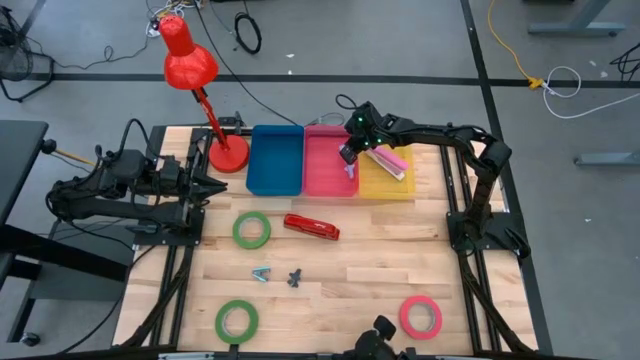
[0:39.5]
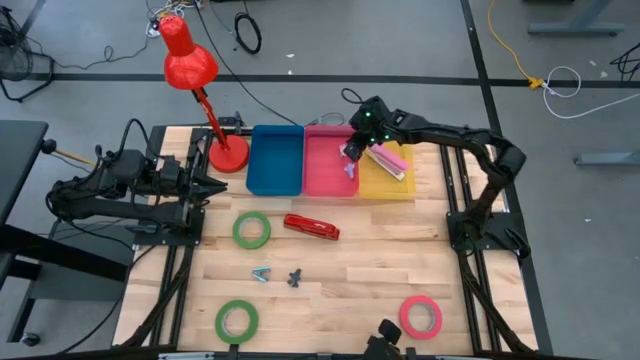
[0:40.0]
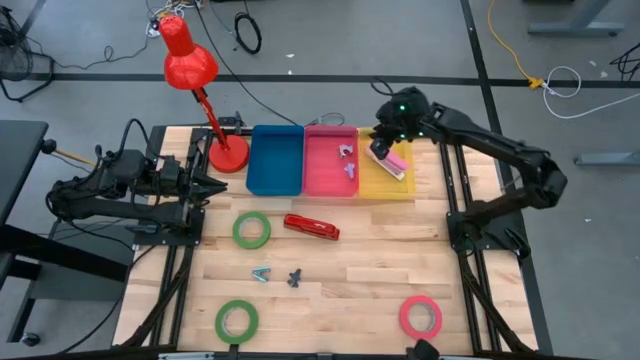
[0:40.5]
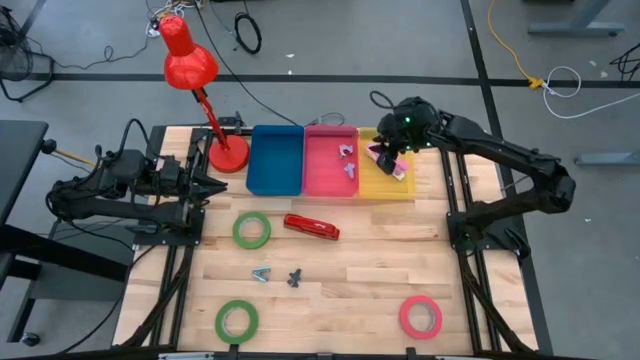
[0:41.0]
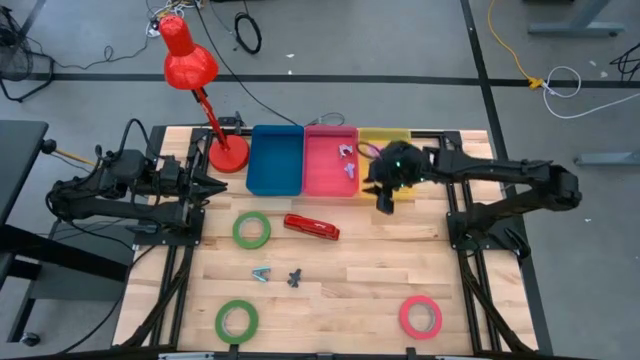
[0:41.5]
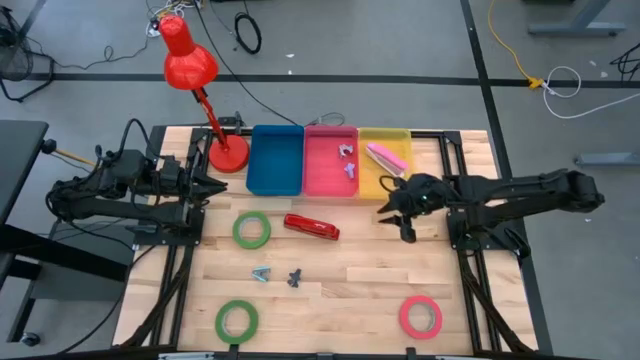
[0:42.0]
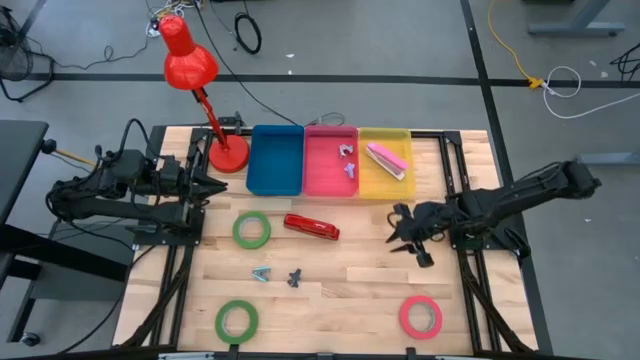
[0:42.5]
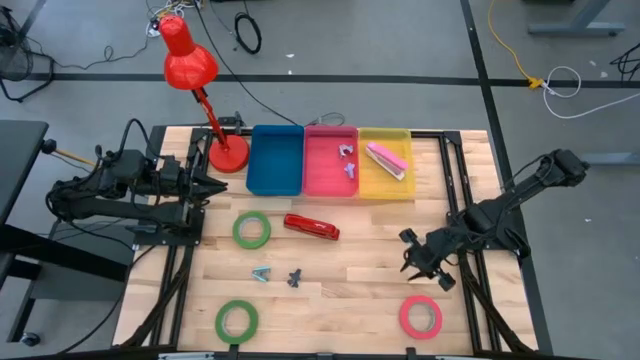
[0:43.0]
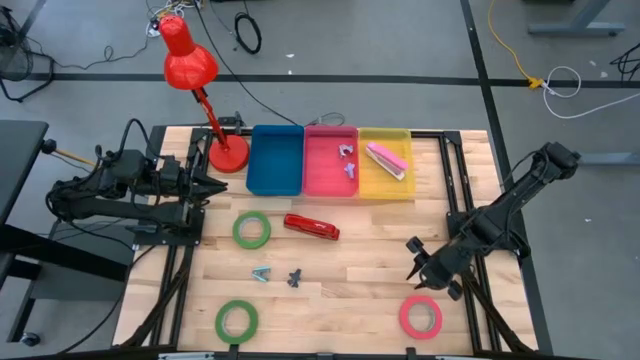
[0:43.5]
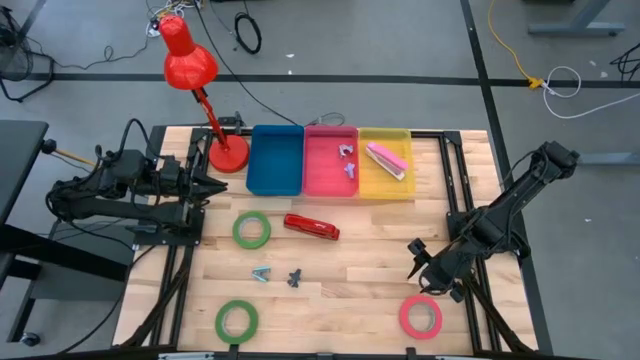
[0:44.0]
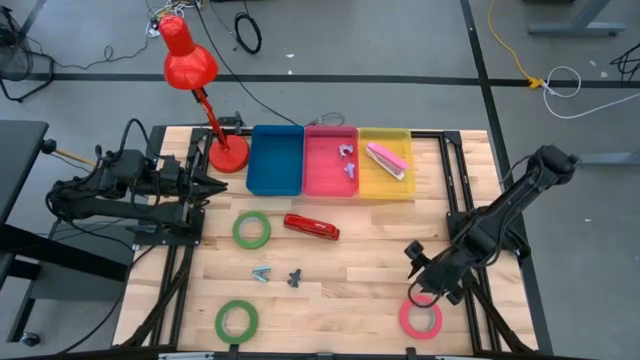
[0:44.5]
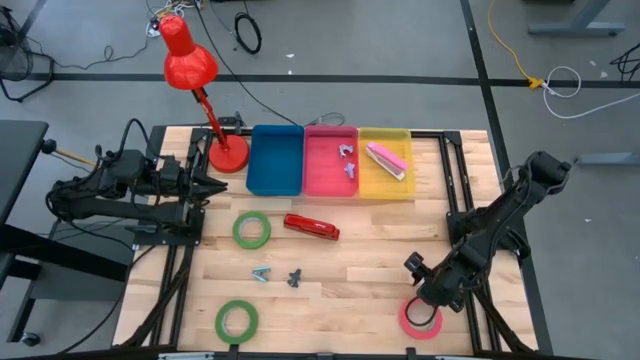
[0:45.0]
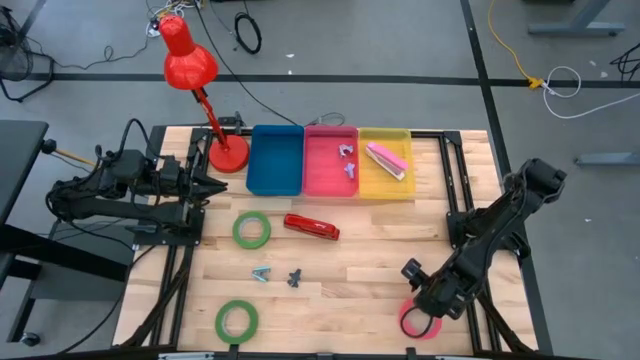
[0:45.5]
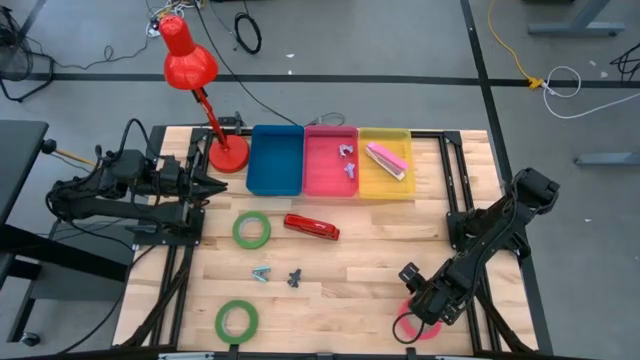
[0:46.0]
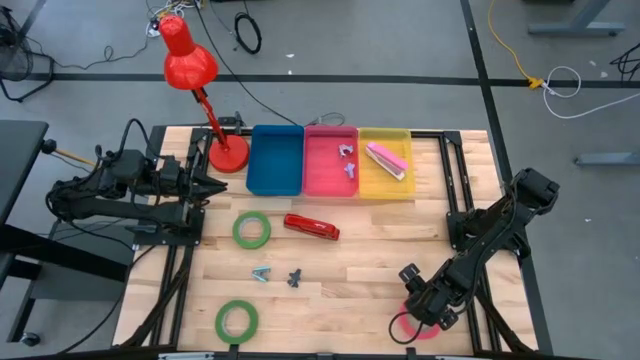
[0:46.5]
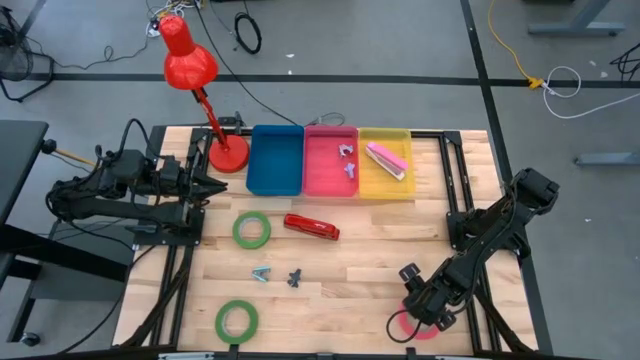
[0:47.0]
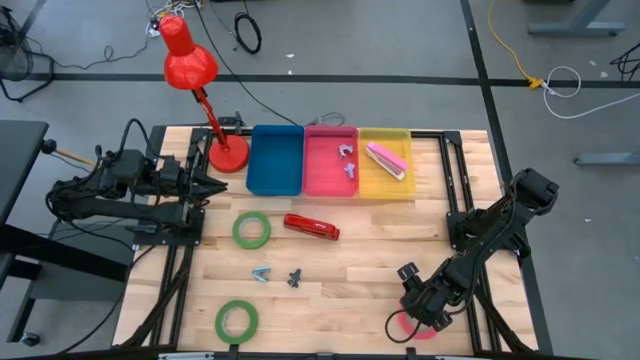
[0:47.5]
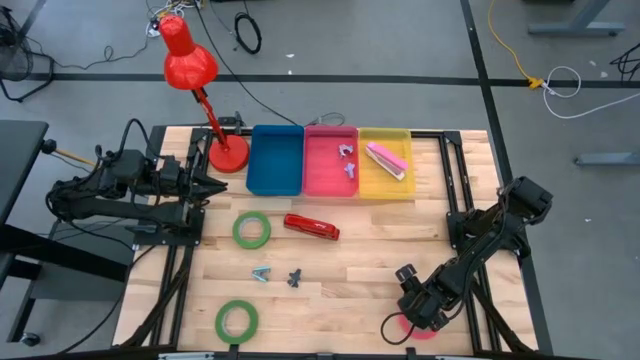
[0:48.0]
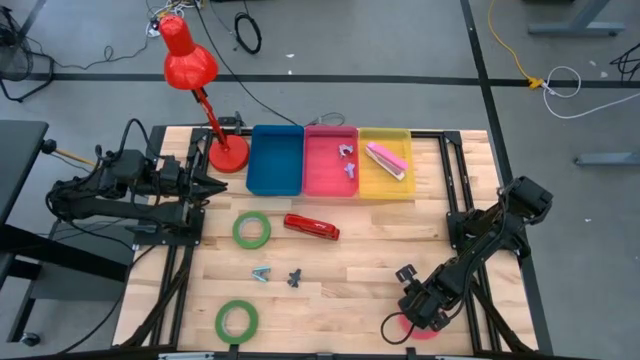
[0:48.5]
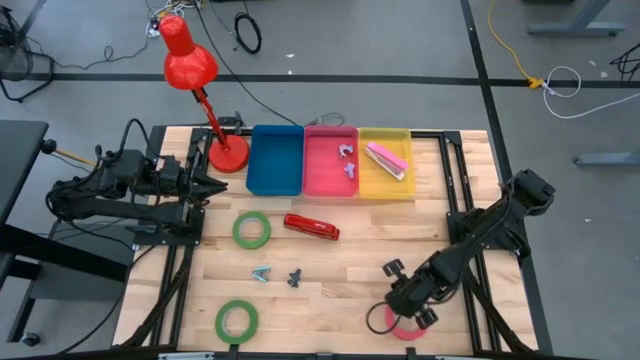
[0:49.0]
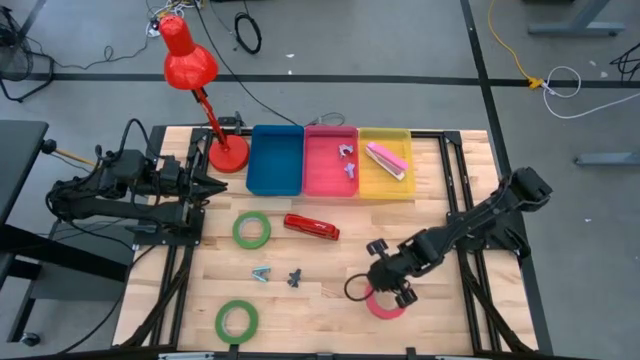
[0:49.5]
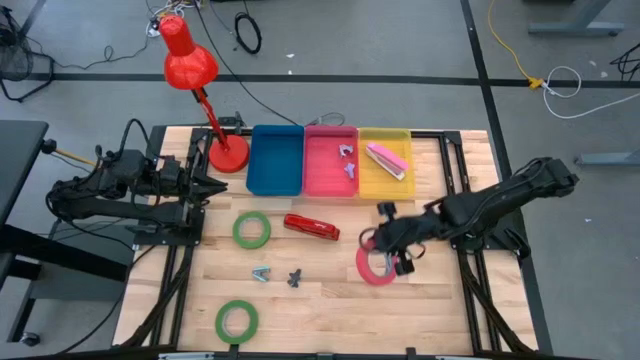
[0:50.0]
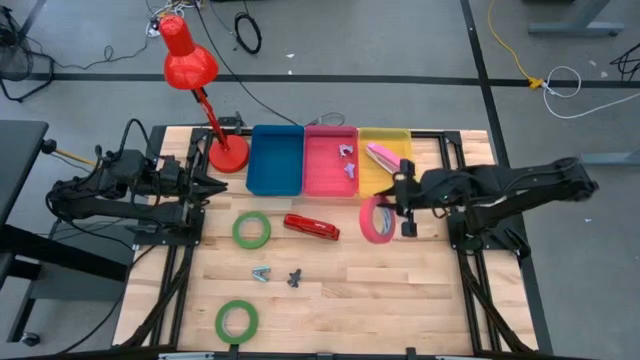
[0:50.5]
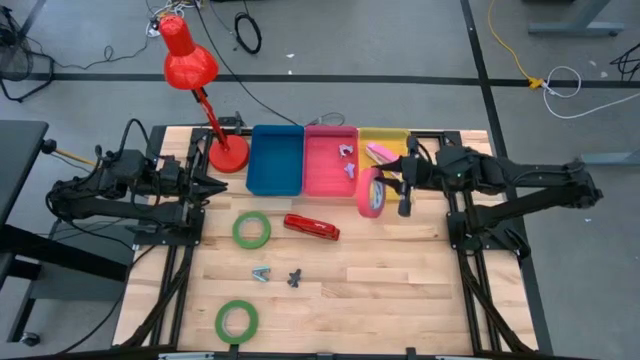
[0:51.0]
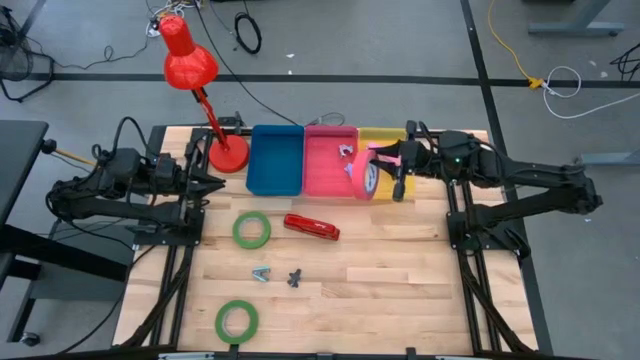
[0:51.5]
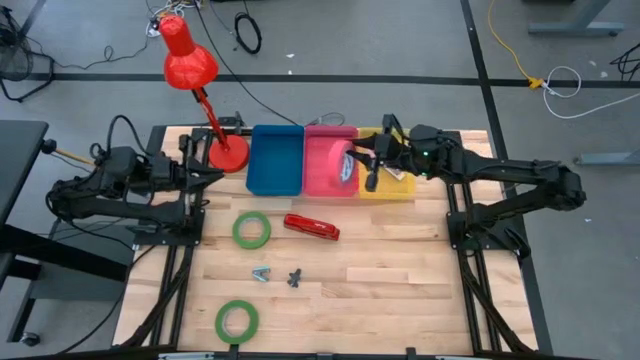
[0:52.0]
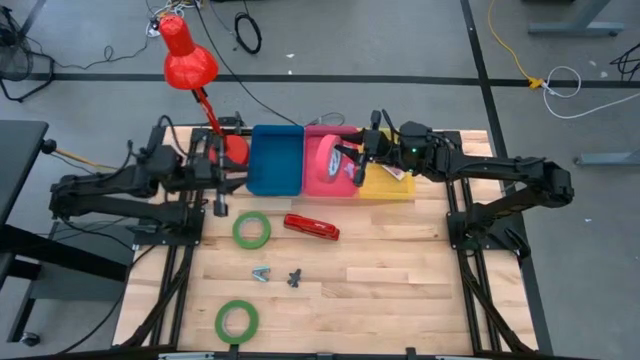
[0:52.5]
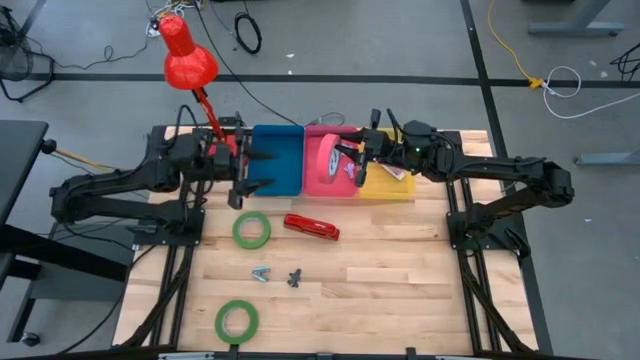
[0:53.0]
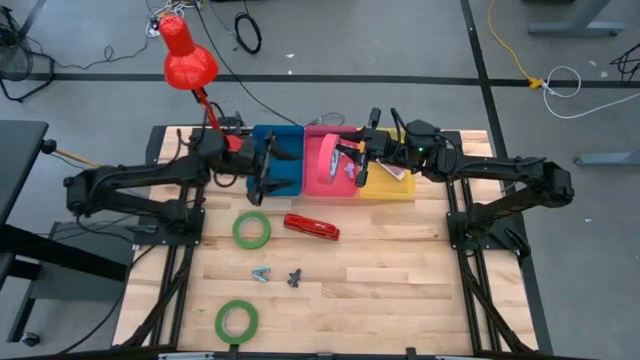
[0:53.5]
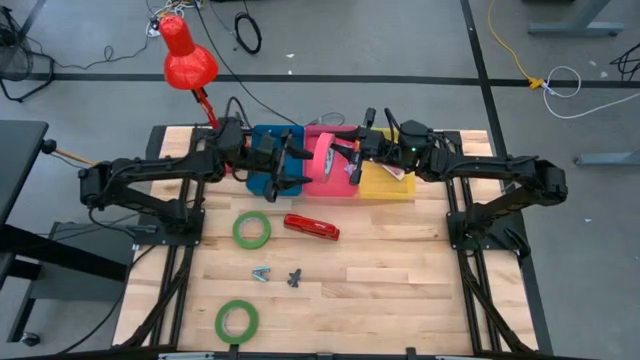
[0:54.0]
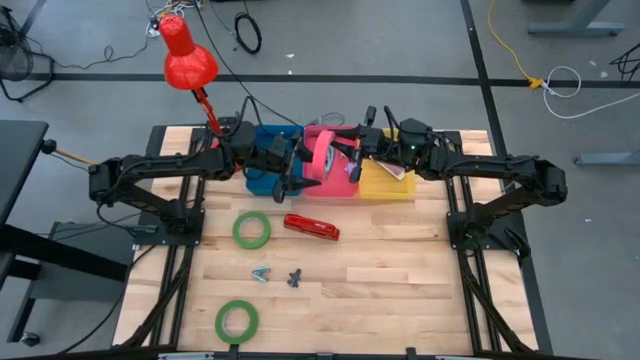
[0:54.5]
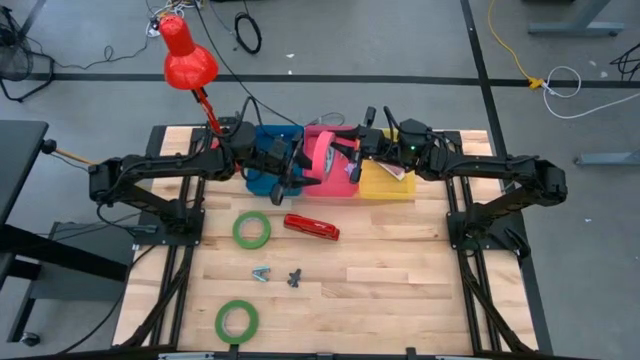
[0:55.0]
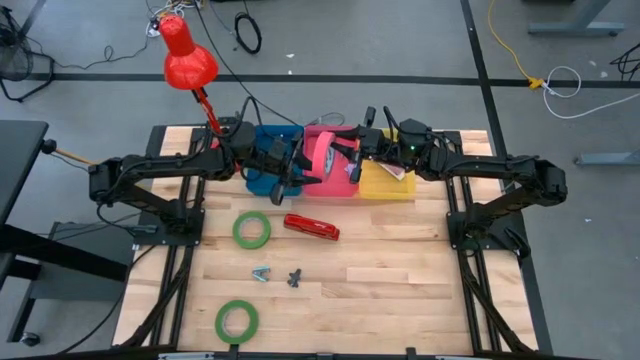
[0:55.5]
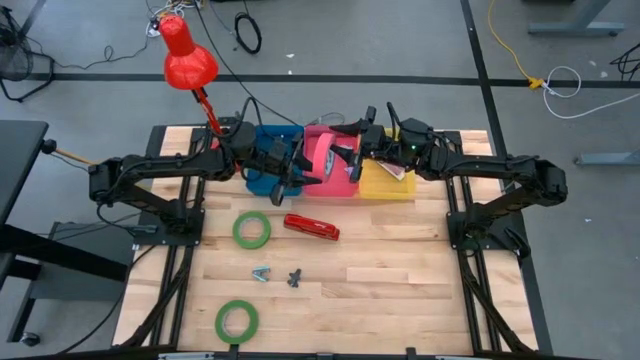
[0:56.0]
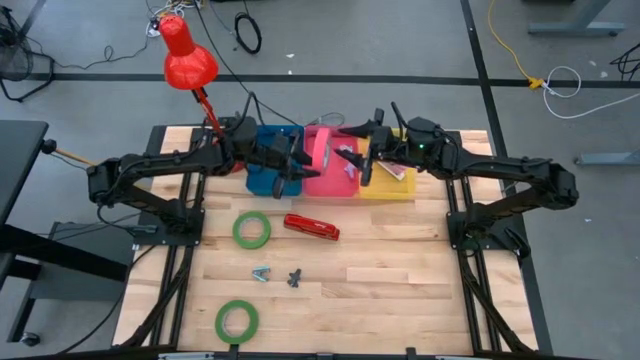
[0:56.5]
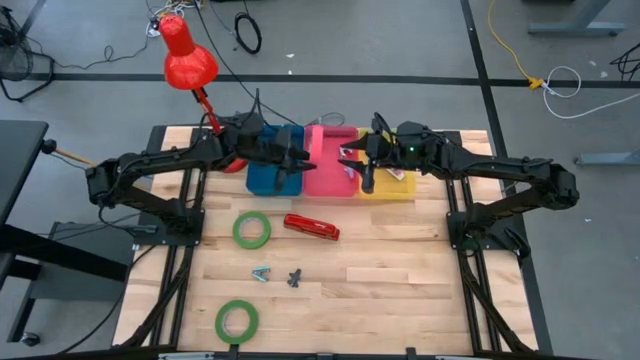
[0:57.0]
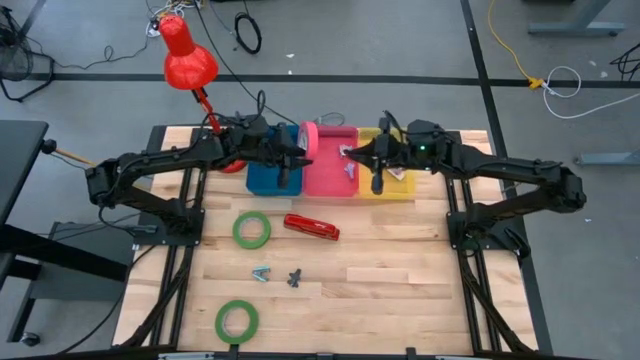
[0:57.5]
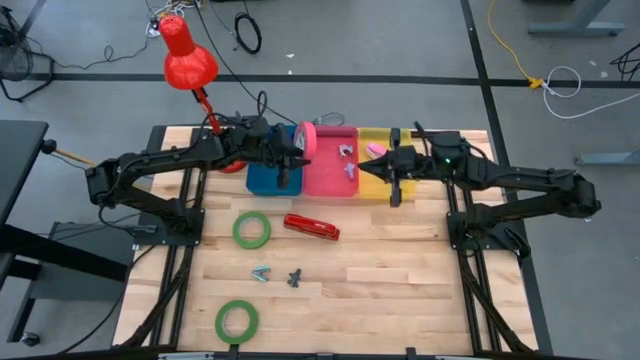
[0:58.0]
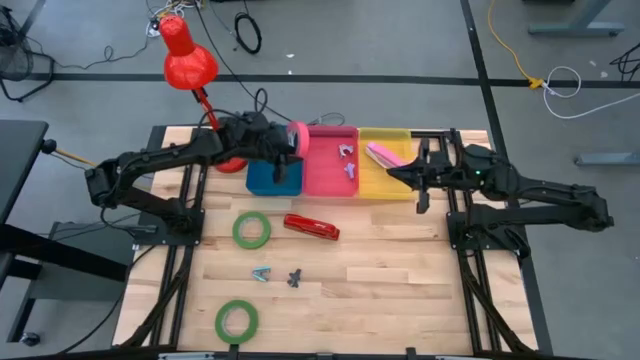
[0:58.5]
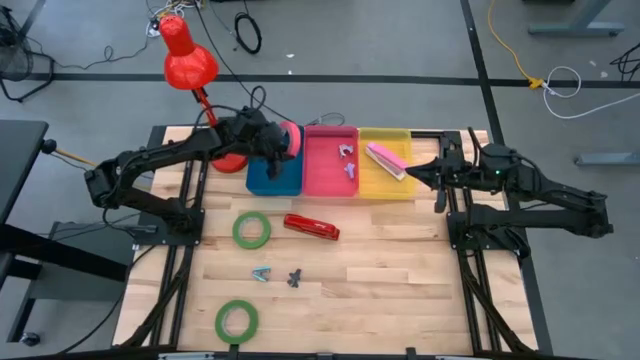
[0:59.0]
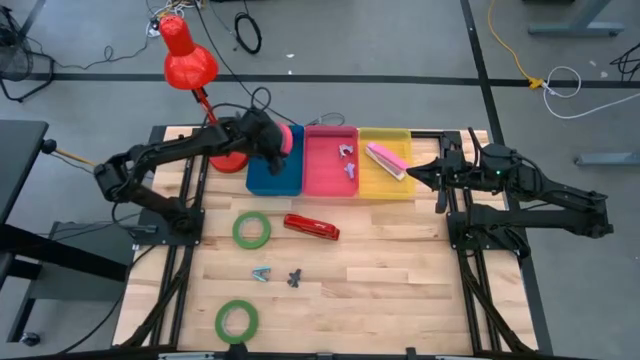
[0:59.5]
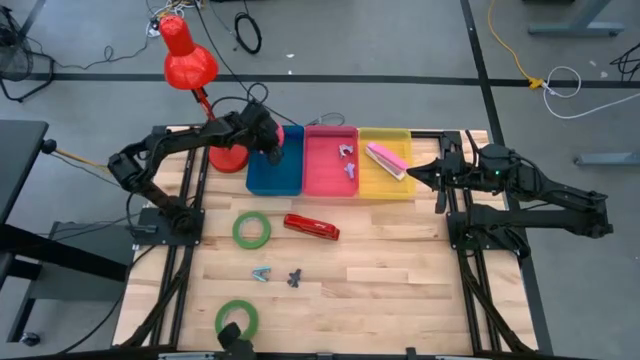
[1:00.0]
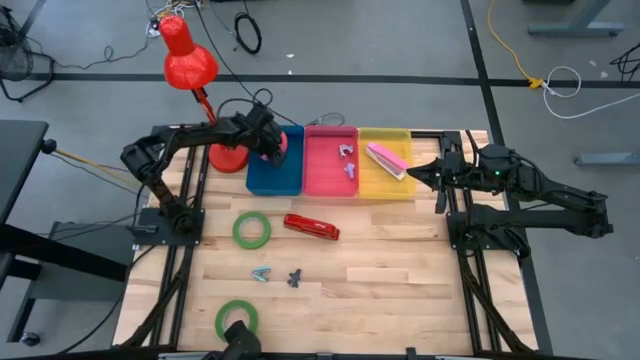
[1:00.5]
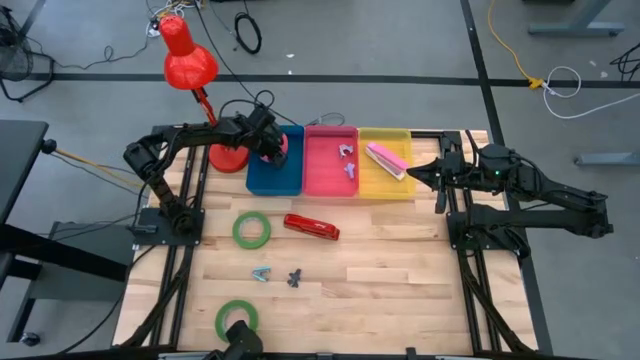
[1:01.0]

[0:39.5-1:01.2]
Task: Pick and place Stapler, Stapler remover, tape
Put the pink tape into the blue bin
